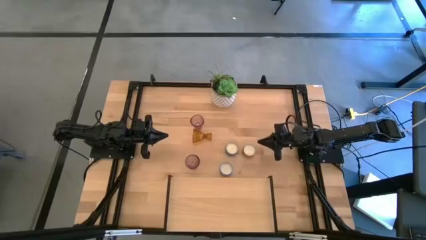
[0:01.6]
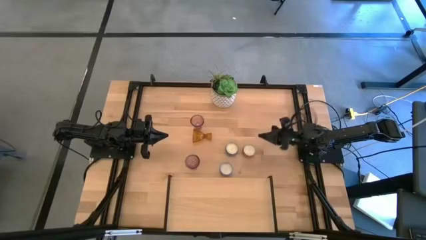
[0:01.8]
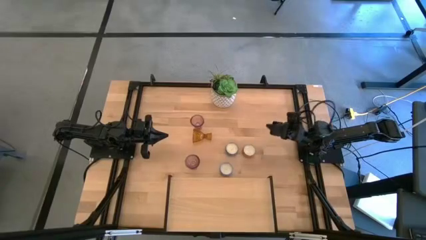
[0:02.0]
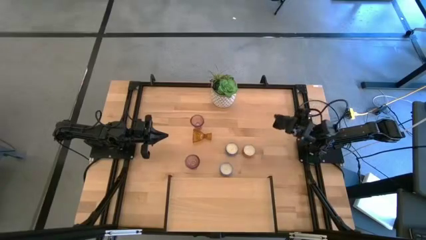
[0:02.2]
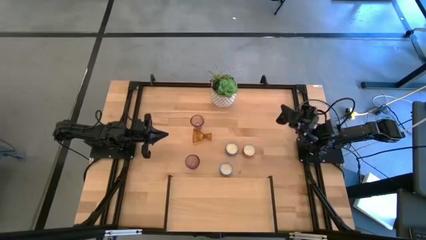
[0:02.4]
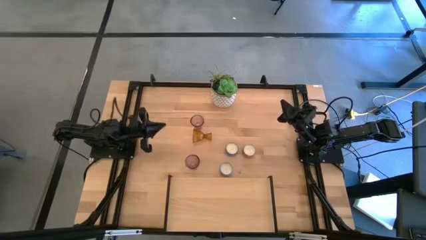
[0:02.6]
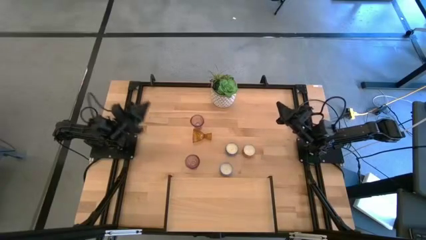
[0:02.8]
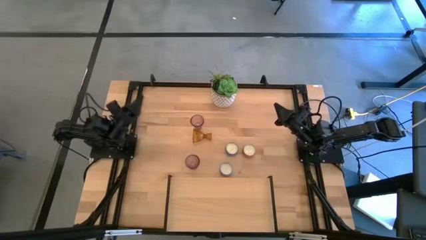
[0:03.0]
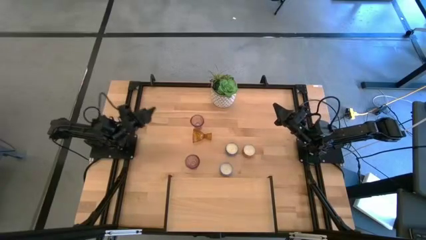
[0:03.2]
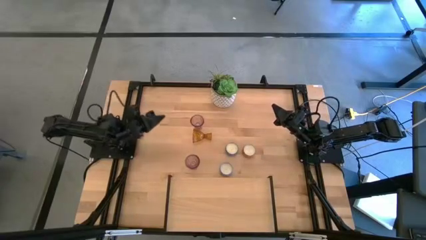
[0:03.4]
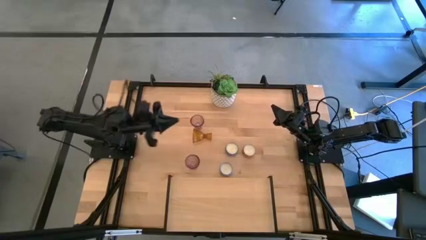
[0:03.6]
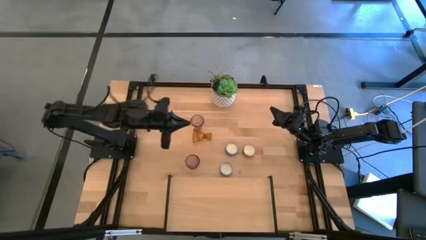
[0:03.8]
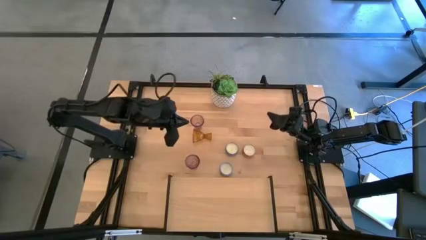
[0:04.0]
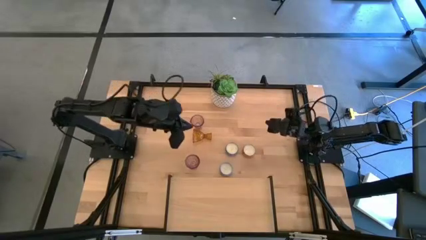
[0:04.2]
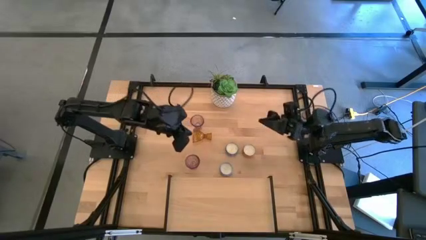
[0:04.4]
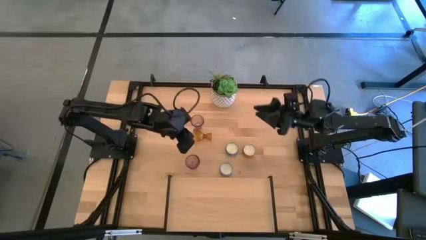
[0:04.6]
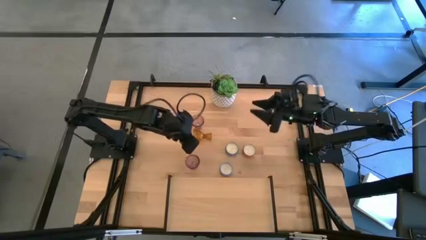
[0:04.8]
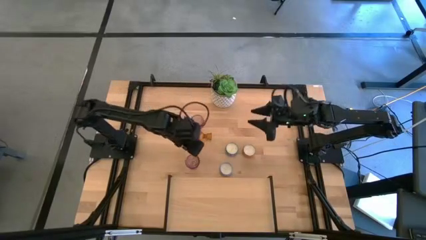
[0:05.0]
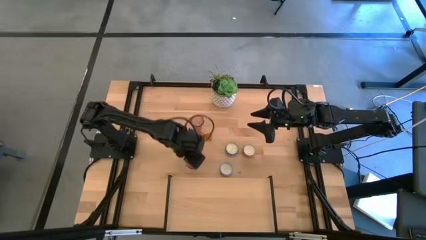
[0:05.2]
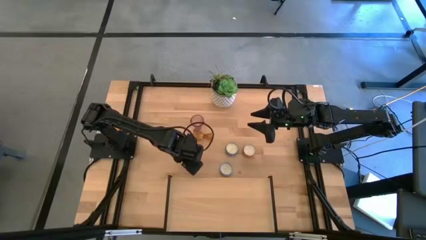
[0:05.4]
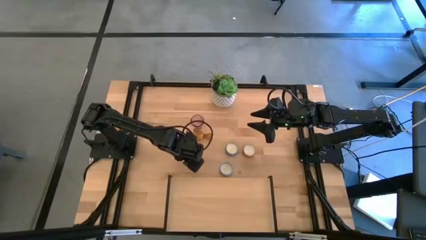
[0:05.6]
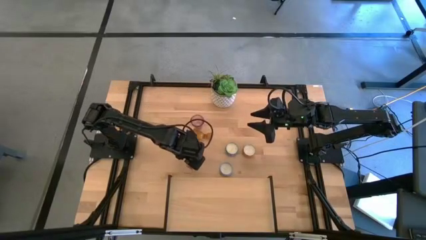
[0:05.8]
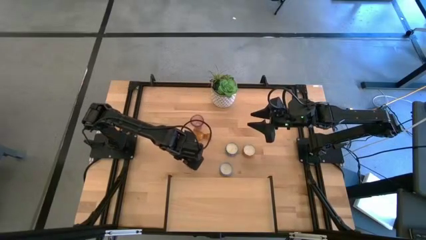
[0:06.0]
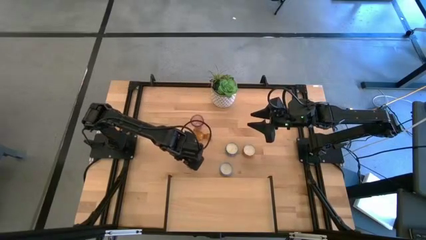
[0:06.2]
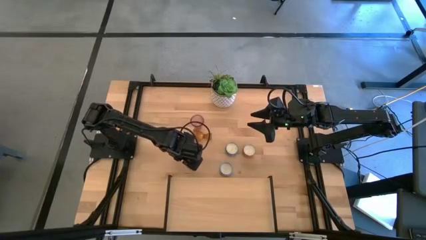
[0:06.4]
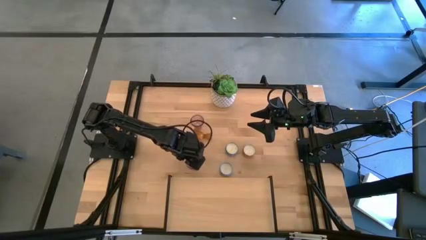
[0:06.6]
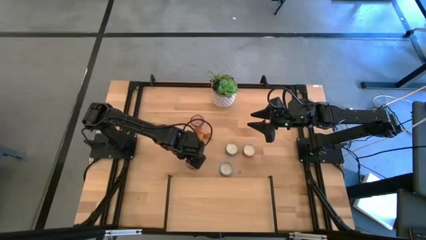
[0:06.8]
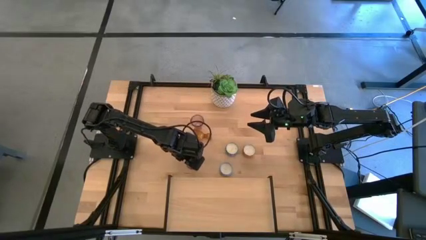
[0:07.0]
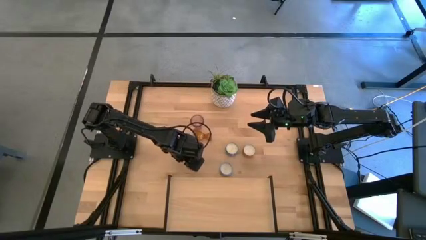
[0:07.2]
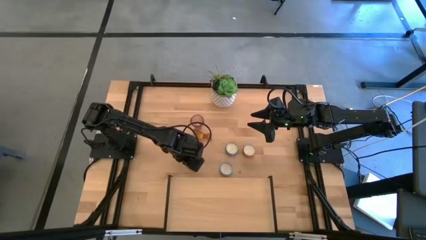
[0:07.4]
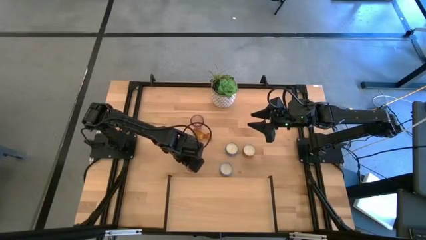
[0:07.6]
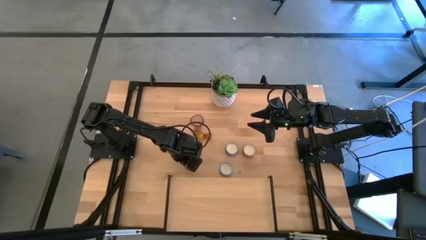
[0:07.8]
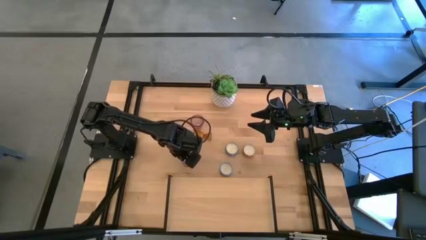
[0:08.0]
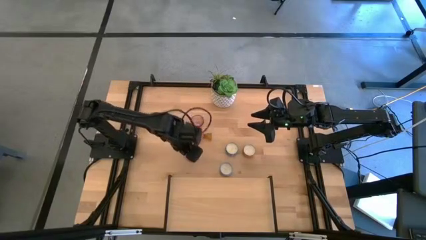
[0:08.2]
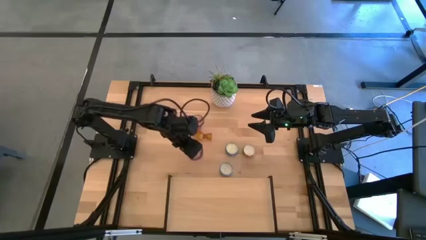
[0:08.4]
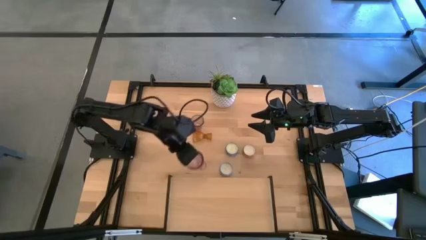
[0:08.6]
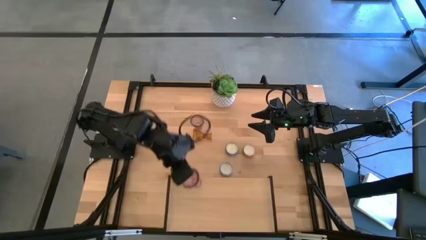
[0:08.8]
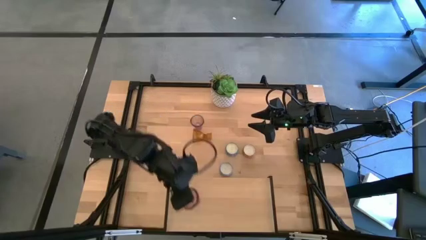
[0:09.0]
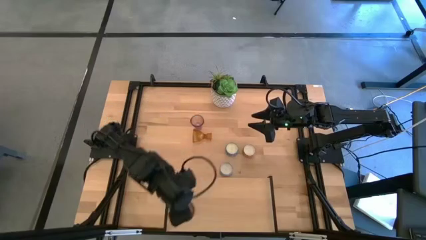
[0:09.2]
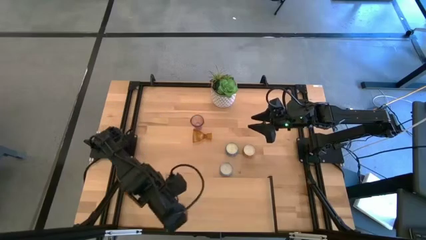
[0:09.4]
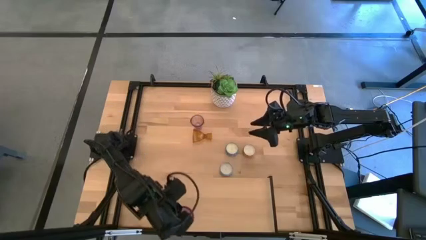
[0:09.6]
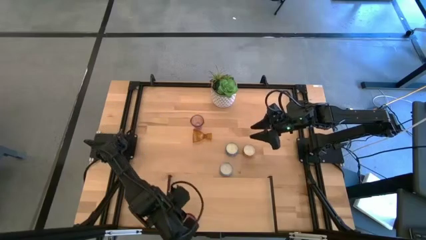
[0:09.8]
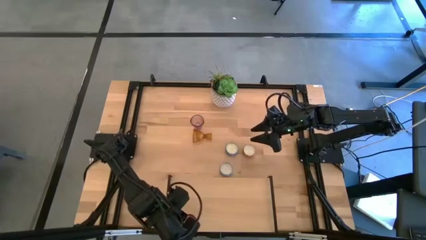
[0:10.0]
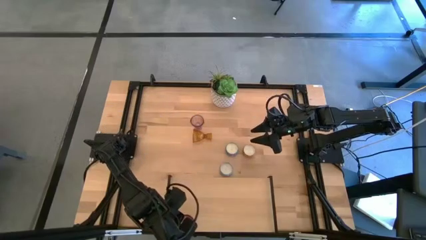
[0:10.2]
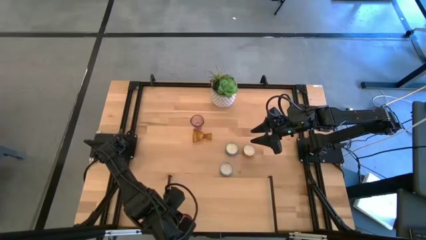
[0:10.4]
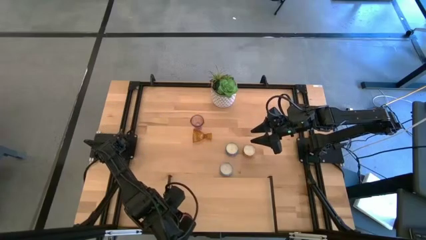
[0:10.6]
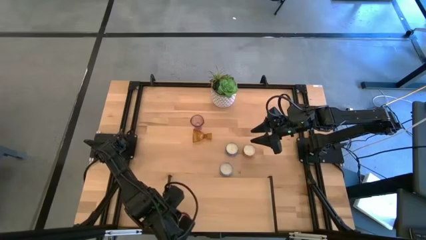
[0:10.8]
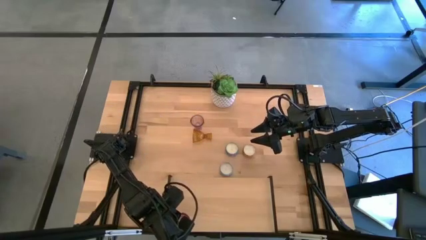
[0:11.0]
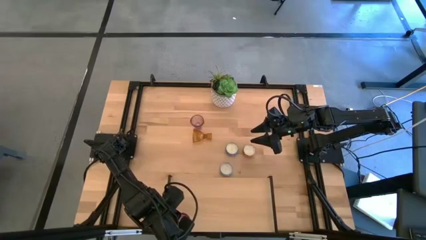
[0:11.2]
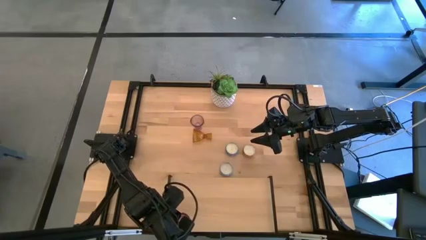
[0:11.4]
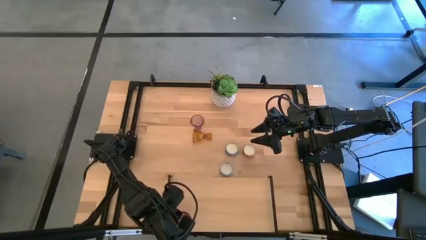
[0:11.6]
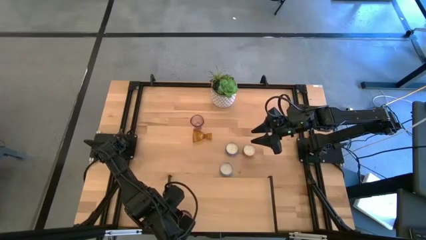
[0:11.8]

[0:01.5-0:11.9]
Task: Pick & Place candle stick holders
Put the bottom pink candle holder on the shelf
